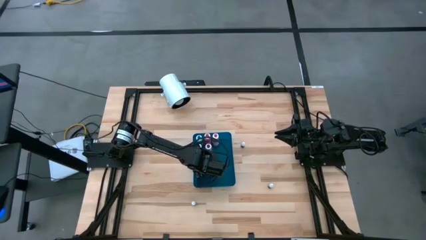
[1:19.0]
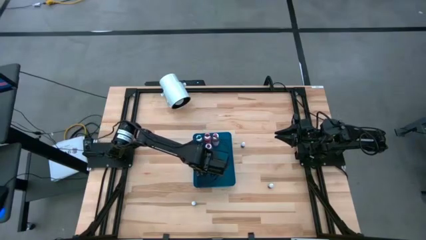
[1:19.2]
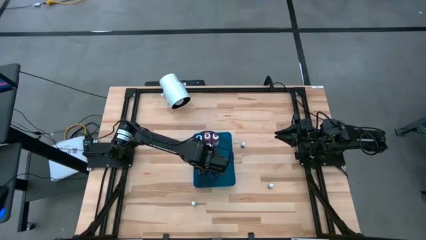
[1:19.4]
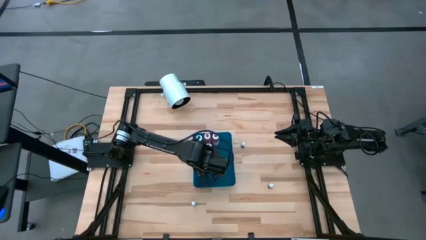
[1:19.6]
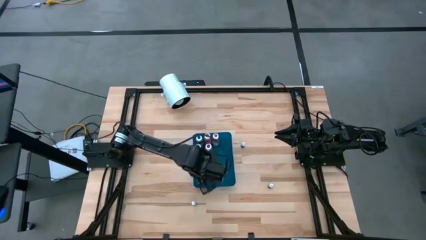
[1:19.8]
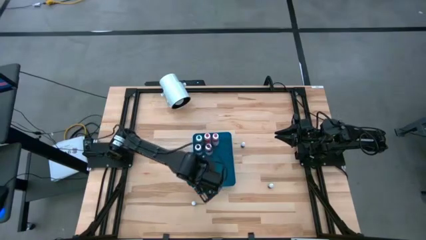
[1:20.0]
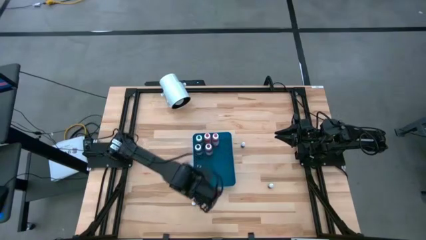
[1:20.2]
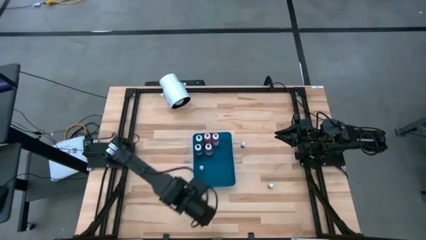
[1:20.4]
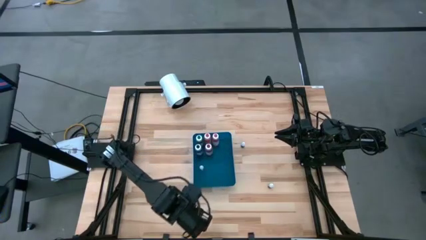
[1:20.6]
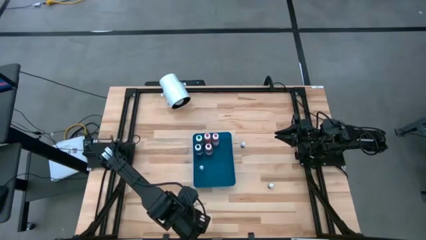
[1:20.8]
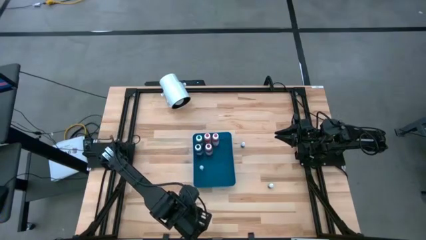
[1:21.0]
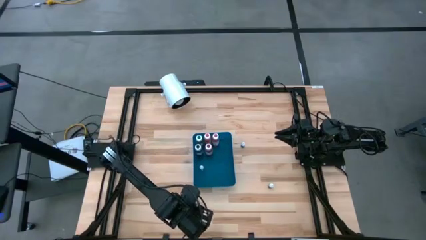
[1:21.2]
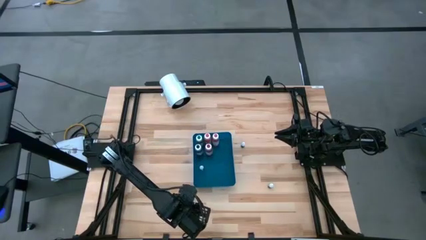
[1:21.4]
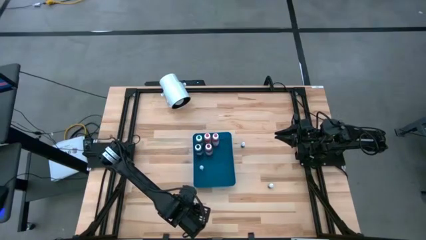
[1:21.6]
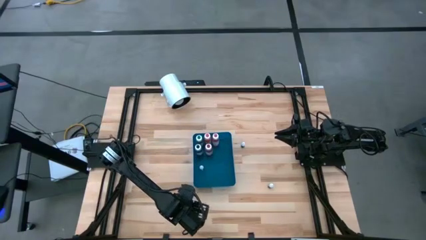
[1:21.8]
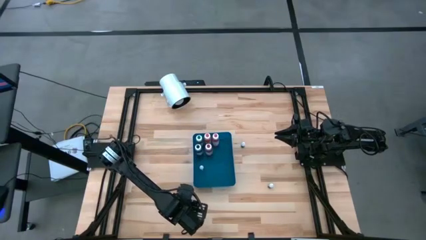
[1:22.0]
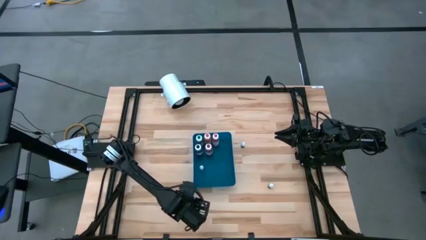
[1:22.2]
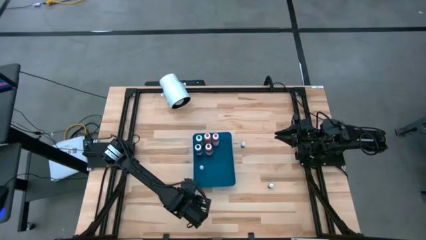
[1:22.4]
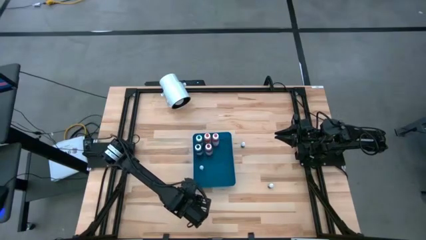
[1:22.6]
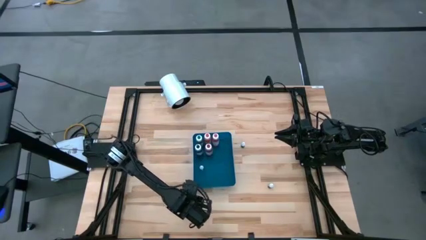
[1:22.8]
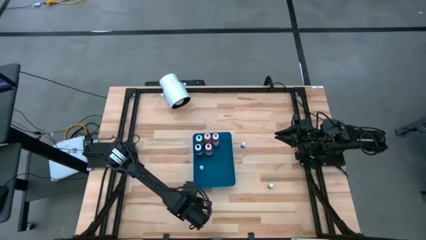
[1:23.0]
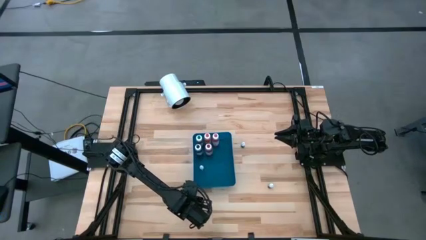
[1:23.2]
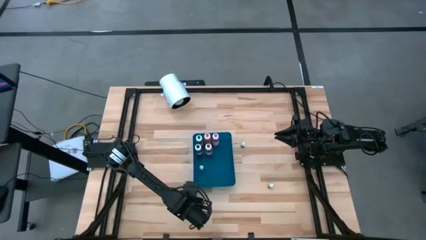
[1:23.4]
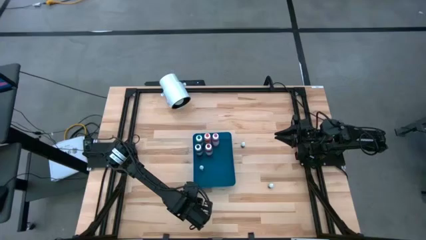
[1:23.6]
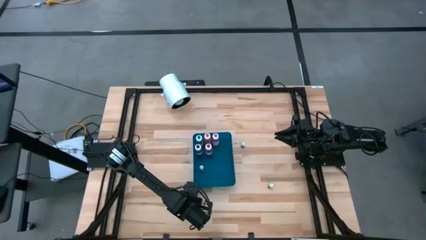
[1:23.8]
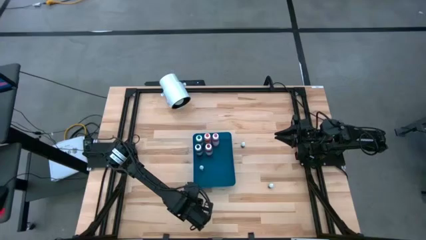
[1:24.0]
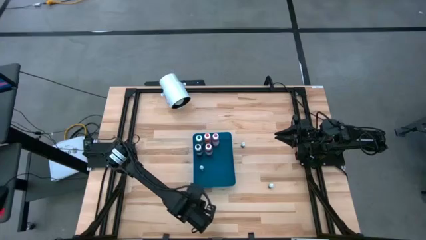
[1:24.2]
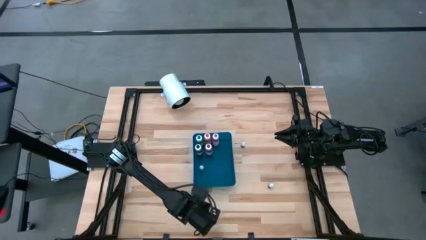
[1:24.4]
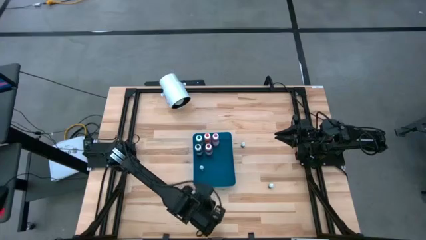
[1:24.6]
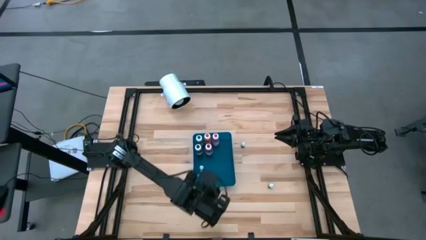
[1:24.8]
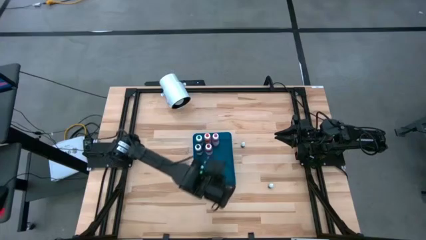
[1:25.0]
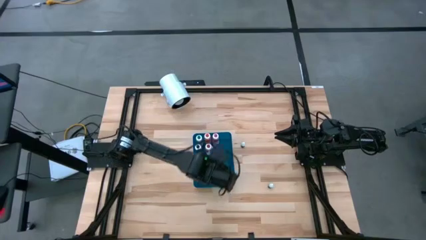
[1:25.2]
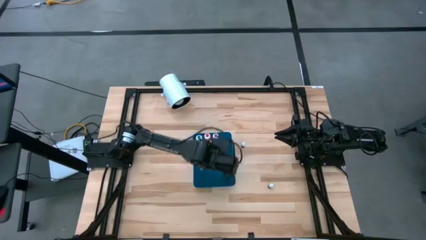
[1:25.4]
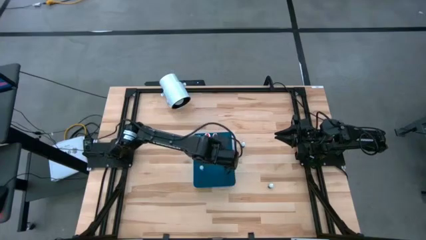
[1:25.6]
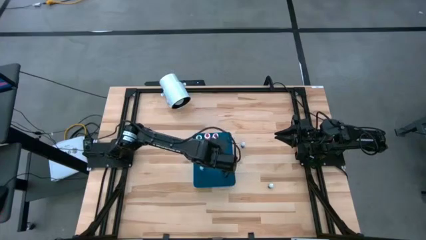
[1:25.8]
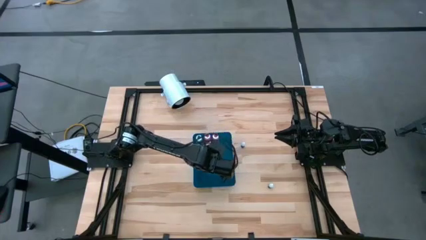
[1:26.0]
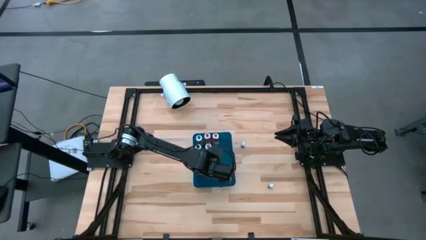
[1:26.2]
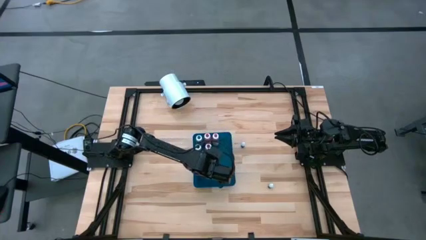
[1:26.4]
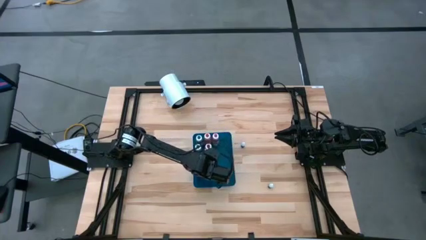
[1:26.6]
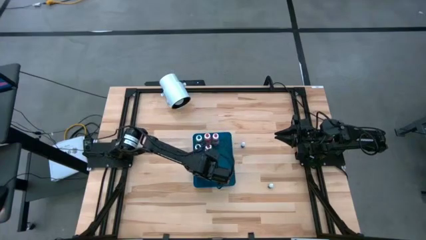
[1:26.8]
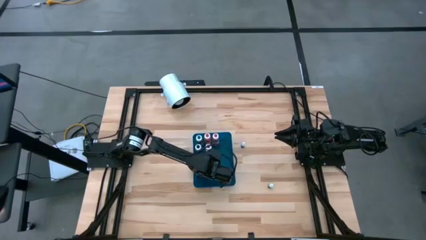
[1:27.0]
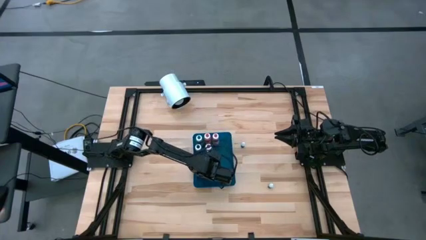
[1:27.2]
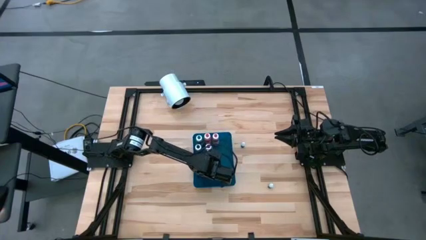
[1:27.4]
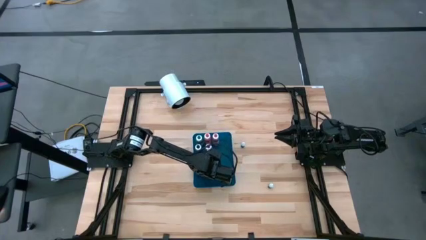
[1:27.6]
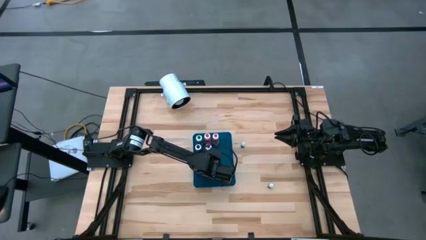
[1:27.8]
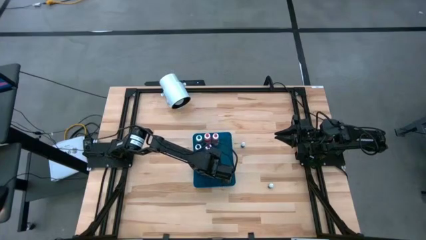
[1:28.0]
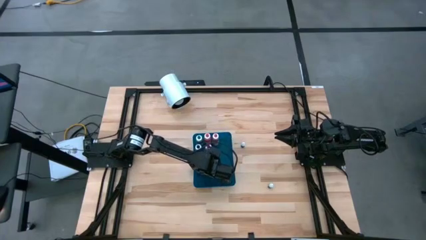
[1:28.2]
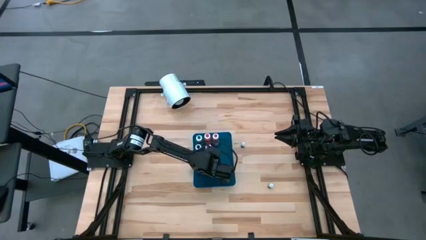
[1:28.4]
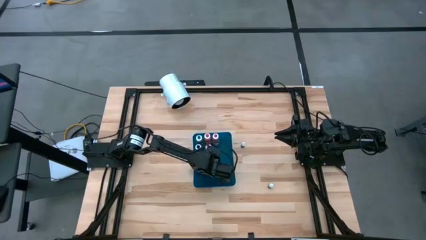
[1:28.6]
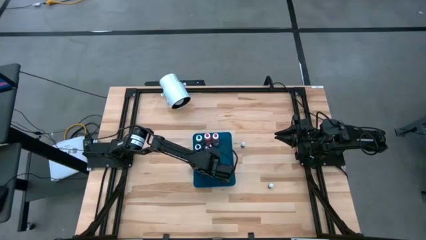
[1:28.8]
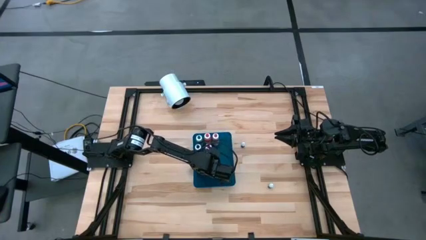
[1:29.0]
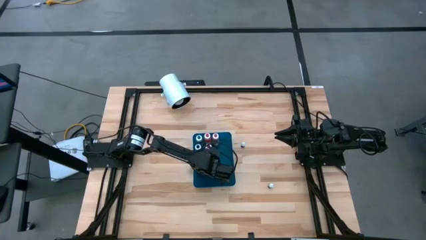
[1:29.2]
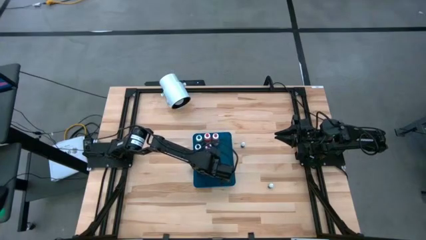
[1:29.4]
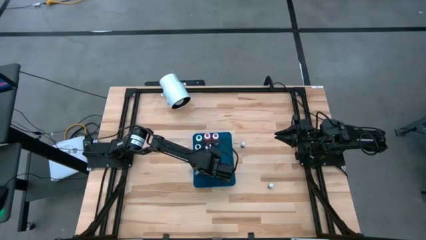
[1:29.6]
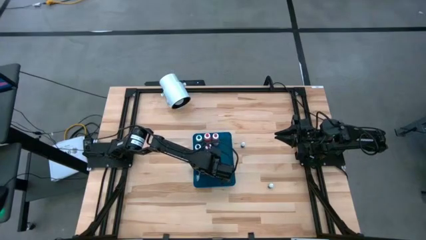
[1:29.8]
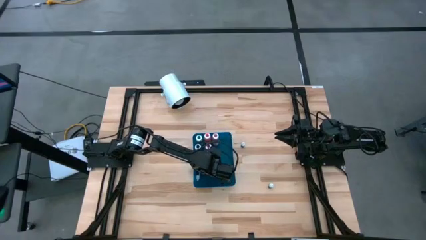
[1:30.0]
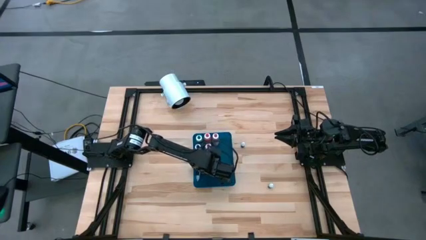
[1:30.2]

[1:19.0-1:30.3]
Task: Pick & Place food coloring
Put the small green food coloring bottle into the blue bin

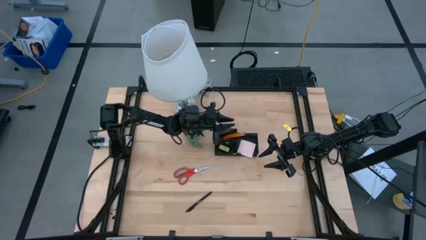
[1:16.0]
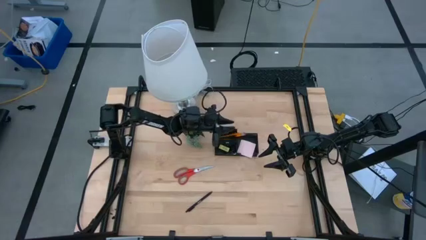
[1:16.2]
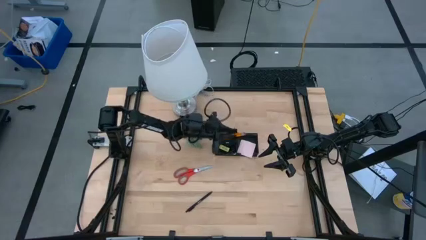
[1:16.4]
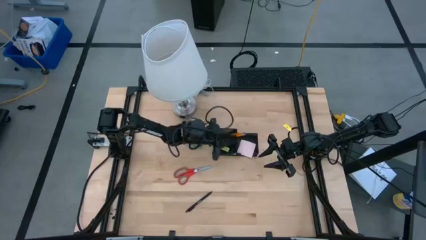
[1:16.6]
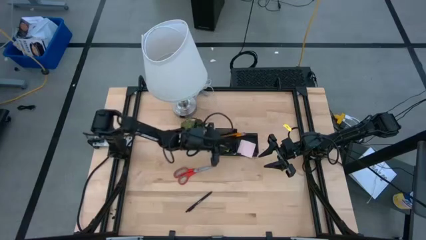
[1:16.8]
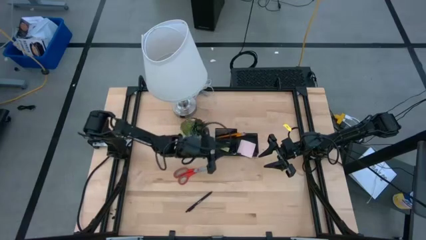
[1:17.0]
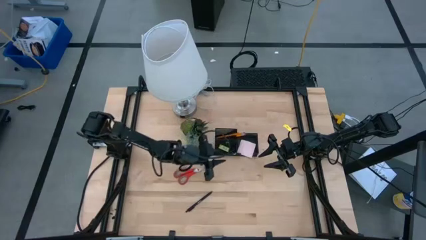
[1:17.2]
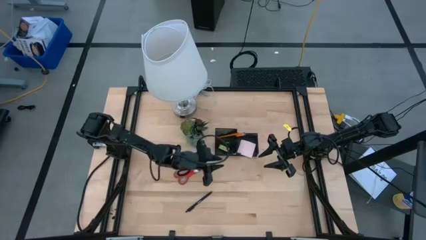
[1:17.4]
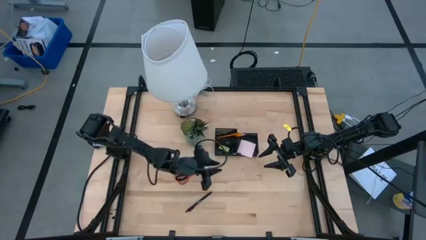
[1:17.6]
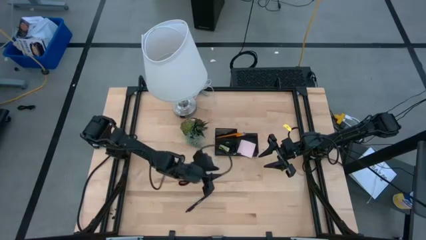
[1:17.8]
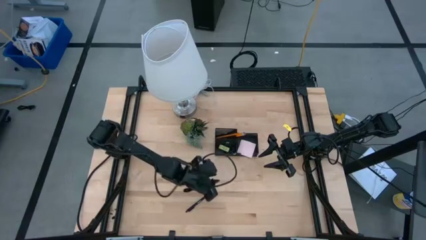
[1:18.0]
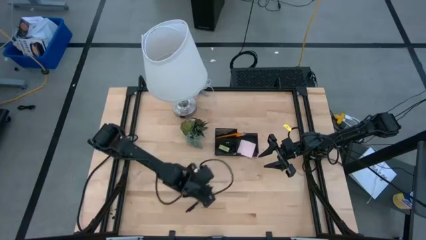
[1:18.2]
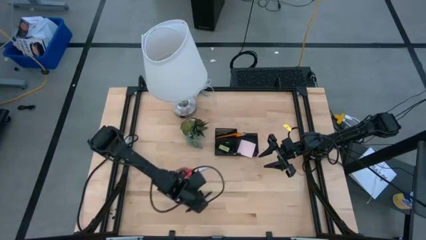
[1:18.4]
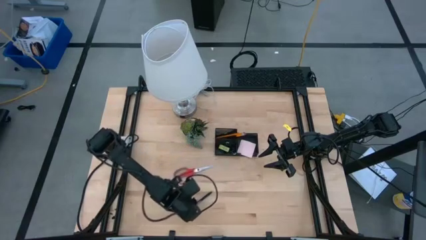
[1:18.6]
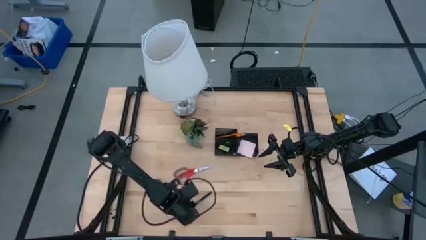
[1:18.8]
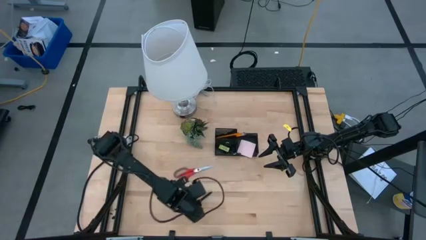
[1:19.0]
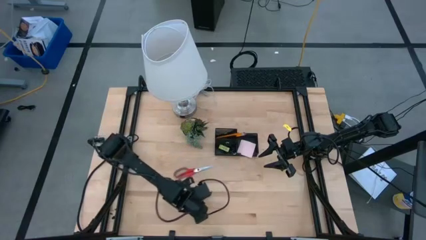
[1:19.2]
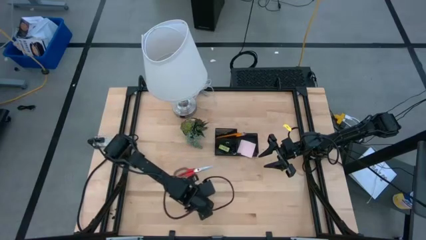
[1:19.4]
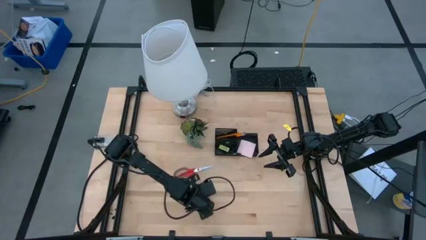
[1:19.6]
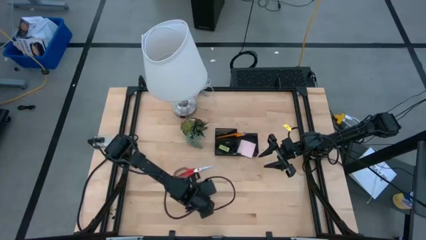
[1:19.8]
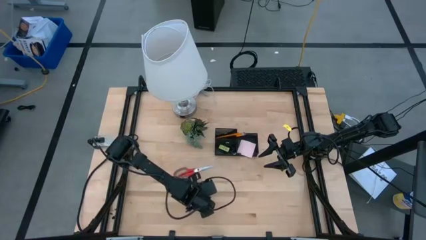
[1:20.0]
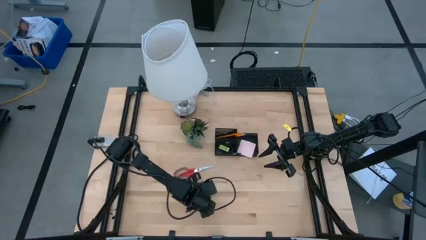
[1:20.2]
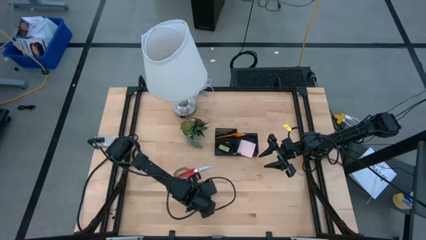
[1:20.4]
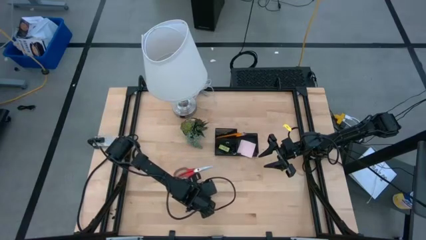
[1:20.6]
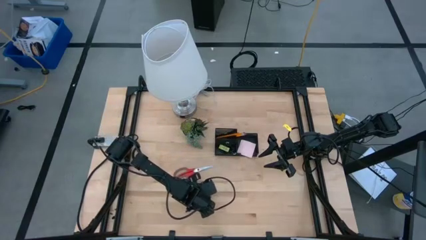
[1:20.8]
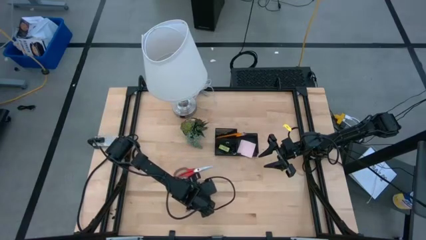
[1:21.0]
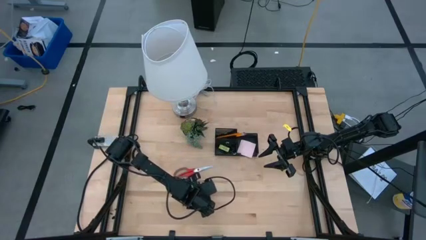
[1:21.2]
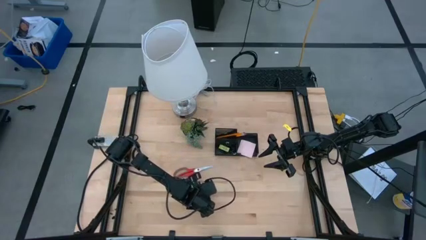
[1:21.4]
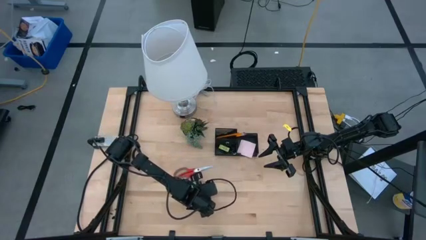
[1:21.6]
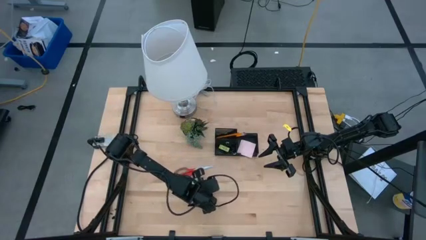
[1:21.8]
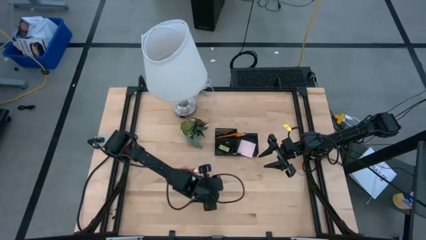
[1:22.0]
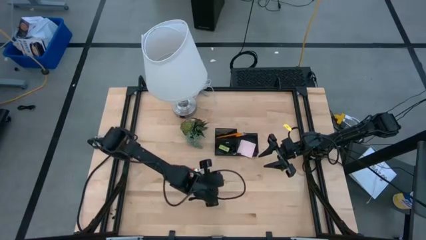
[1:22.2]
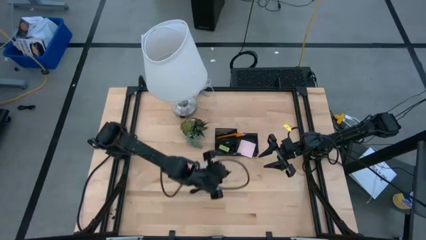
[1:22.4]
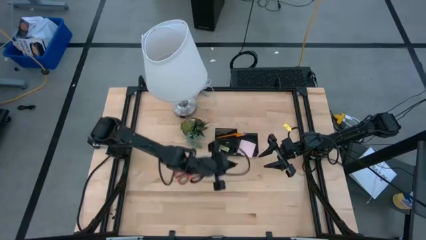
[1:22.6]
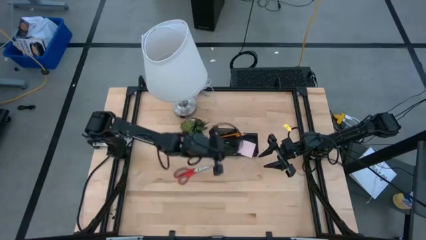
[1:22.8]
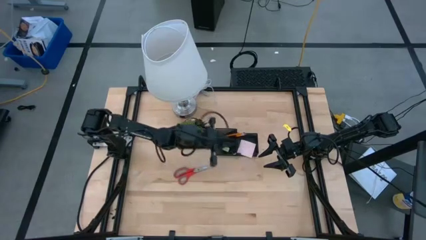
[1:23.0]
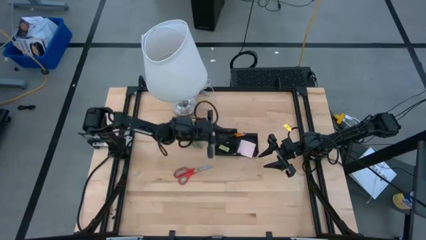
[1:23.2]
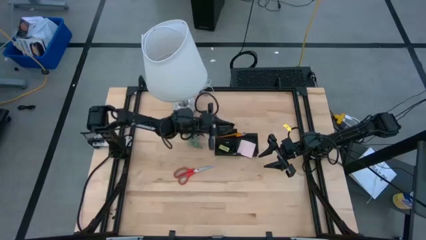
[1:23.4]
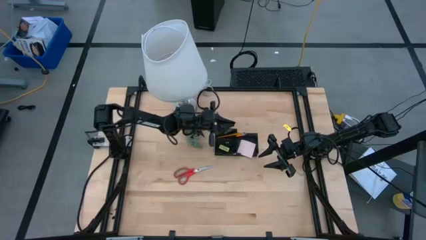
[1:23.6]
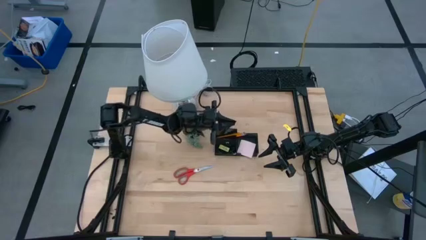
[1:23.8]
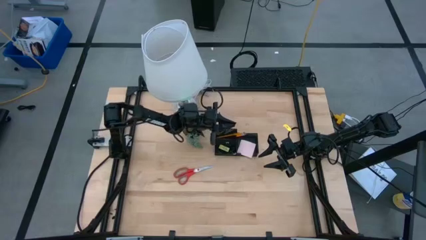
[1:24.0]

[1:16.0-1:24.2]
Task: Pick and place office supplies into organizer
Put the black pen into the desk organizer
